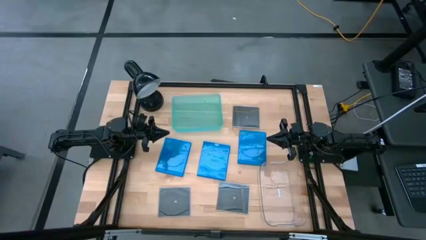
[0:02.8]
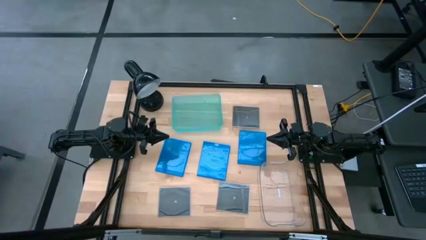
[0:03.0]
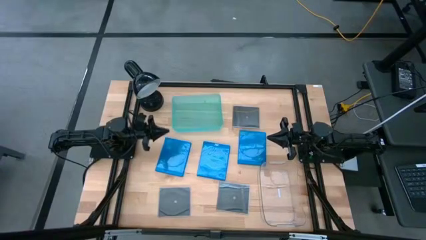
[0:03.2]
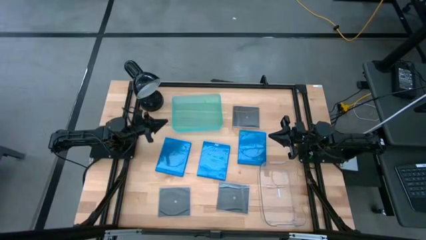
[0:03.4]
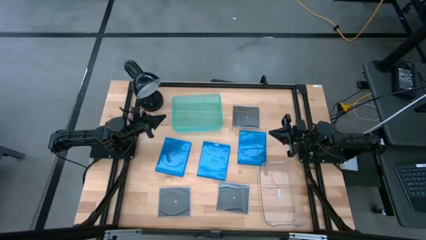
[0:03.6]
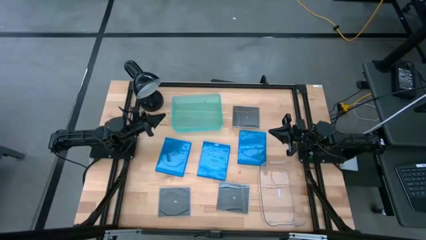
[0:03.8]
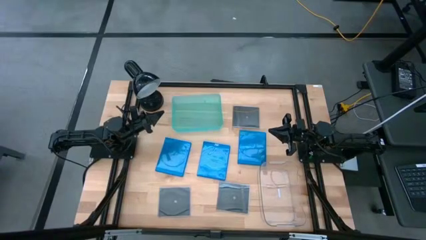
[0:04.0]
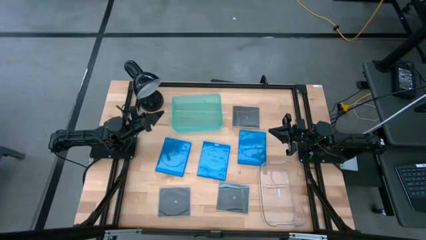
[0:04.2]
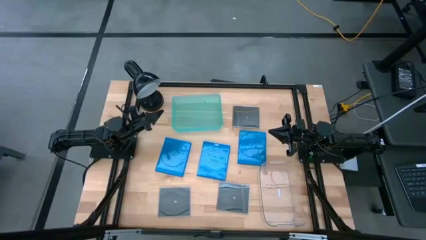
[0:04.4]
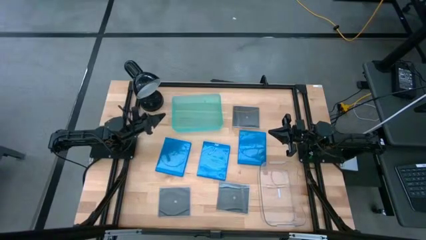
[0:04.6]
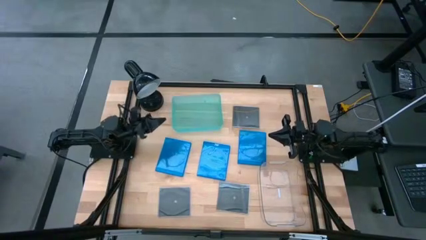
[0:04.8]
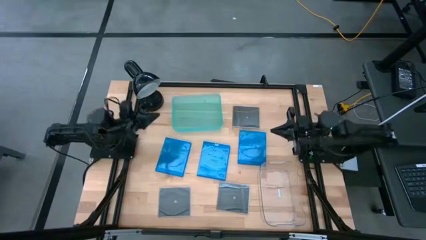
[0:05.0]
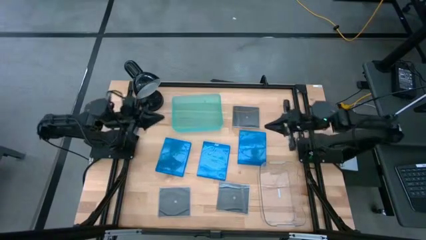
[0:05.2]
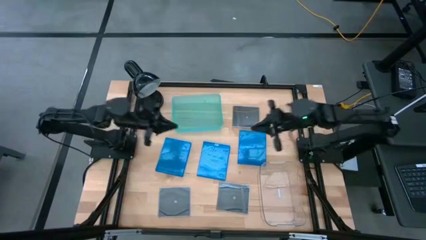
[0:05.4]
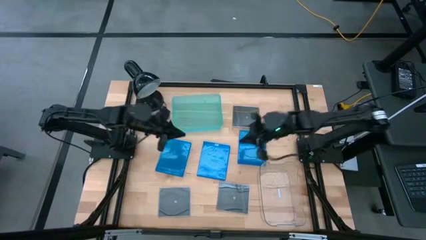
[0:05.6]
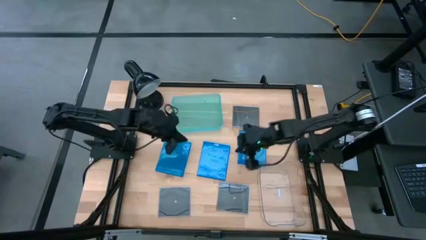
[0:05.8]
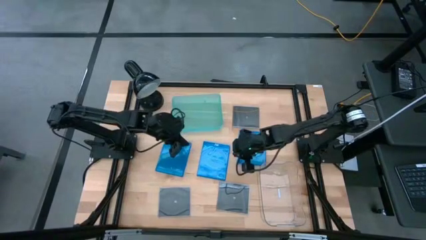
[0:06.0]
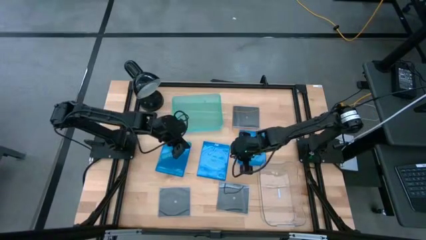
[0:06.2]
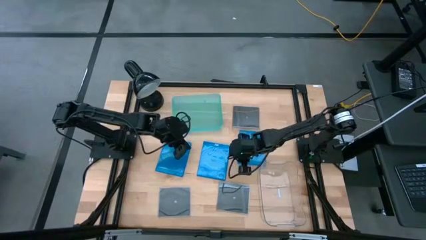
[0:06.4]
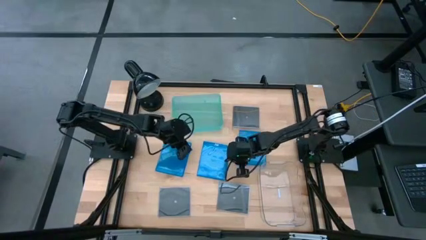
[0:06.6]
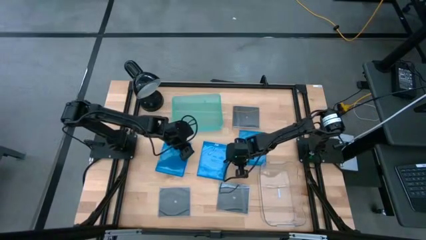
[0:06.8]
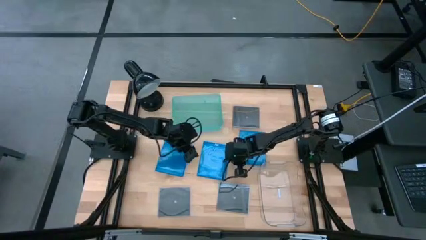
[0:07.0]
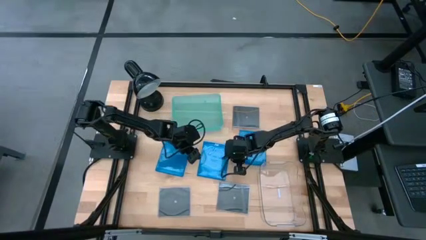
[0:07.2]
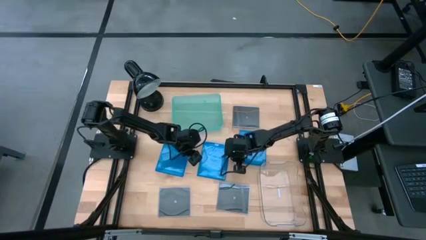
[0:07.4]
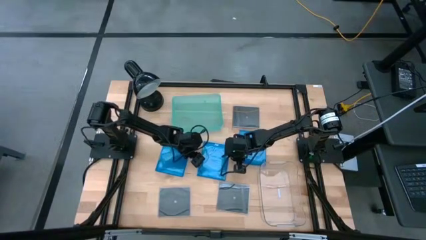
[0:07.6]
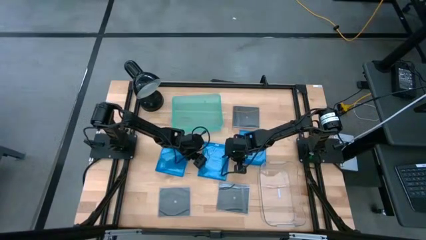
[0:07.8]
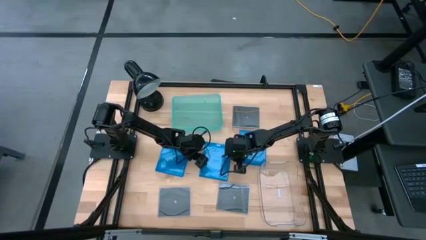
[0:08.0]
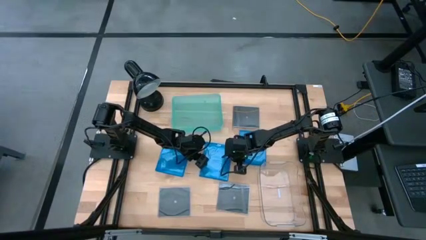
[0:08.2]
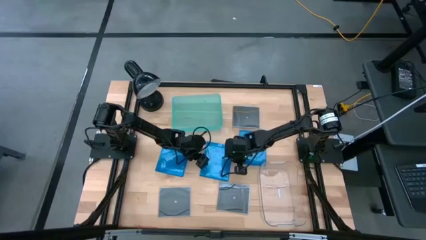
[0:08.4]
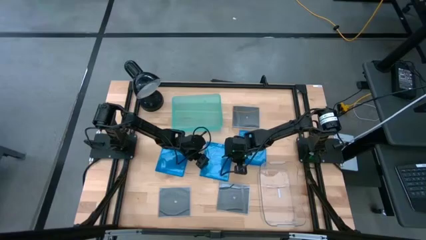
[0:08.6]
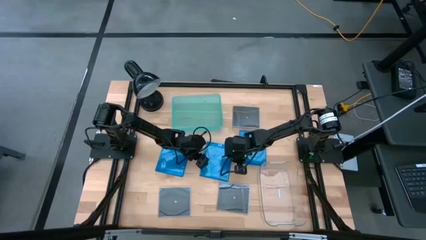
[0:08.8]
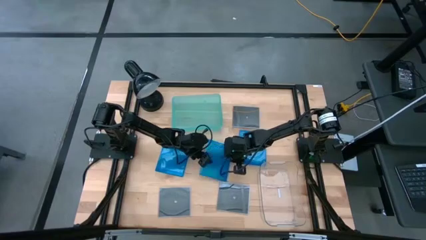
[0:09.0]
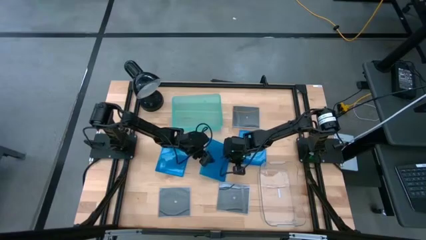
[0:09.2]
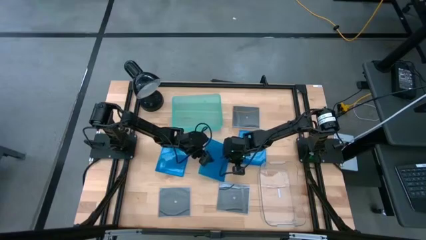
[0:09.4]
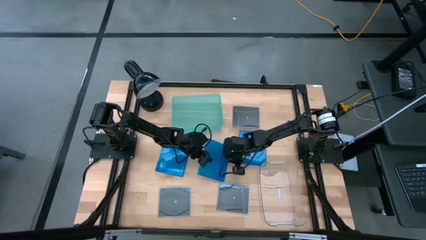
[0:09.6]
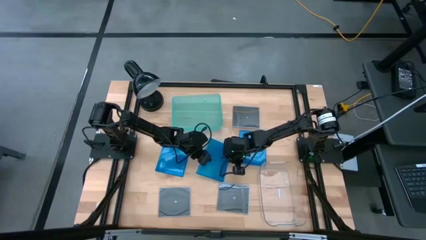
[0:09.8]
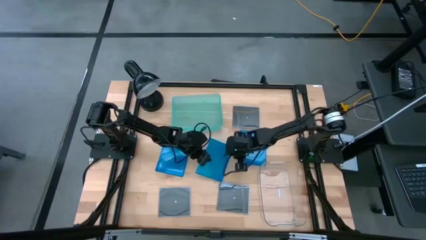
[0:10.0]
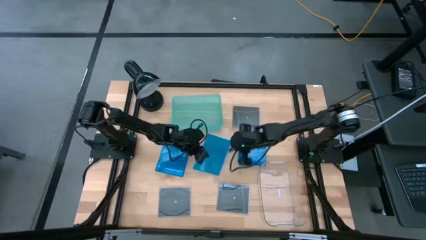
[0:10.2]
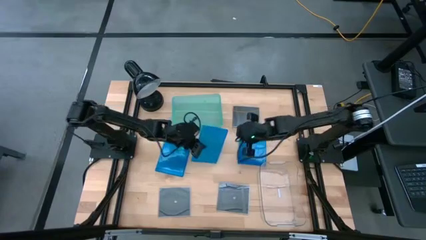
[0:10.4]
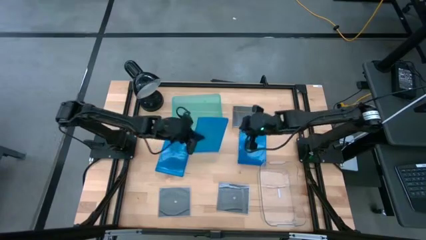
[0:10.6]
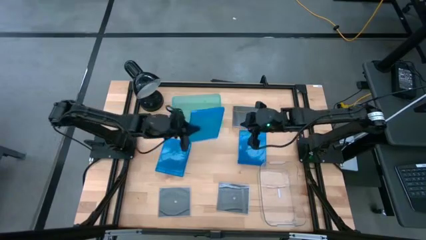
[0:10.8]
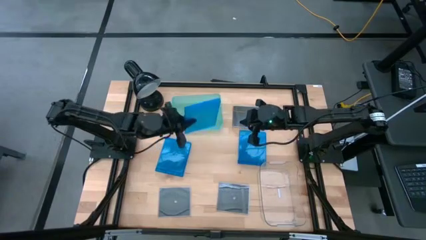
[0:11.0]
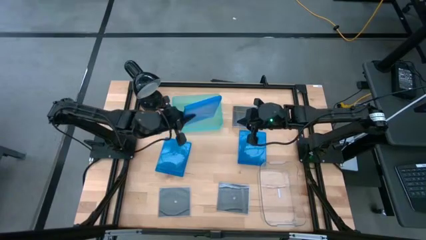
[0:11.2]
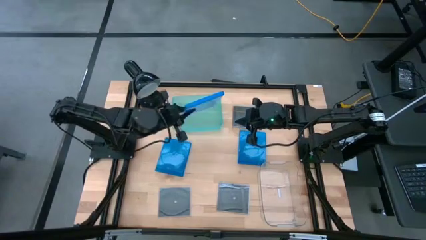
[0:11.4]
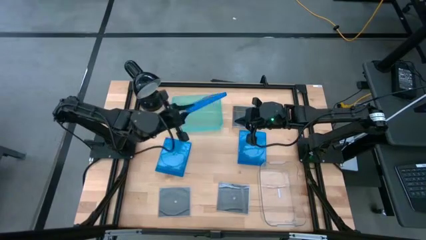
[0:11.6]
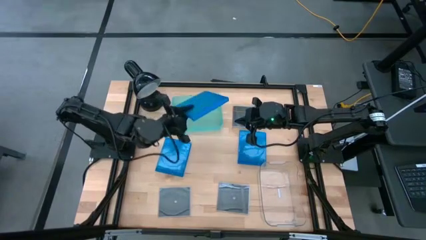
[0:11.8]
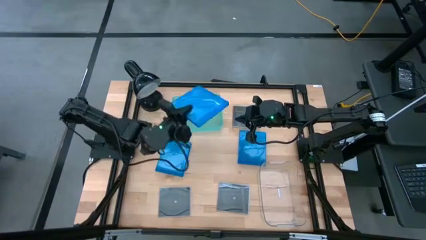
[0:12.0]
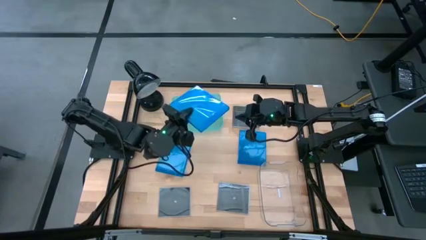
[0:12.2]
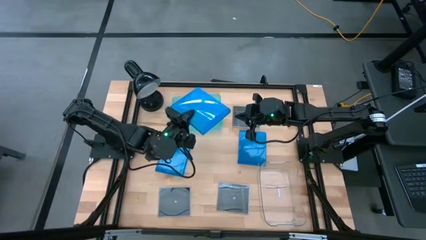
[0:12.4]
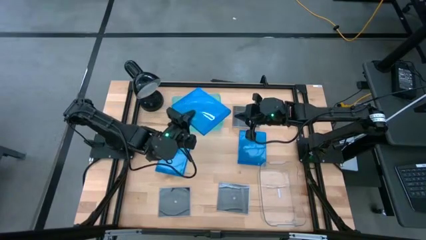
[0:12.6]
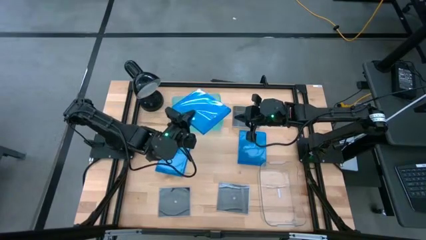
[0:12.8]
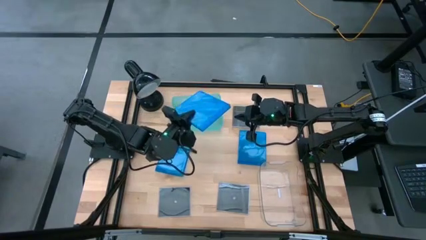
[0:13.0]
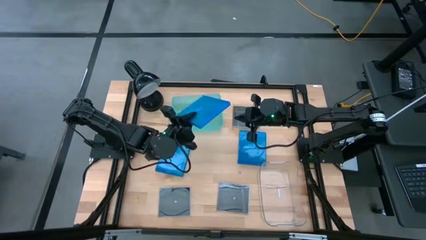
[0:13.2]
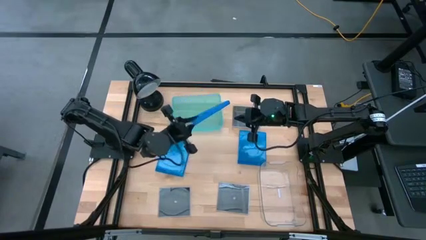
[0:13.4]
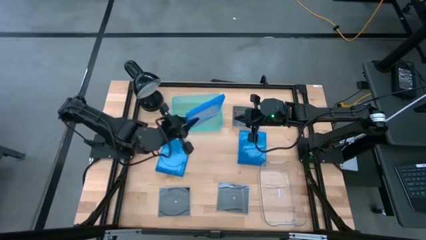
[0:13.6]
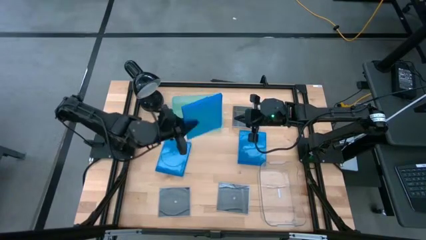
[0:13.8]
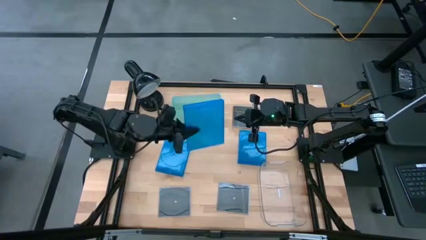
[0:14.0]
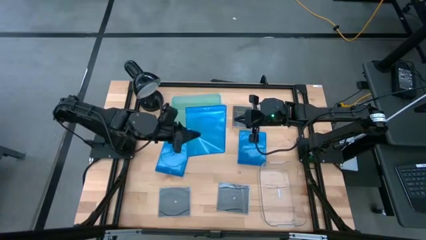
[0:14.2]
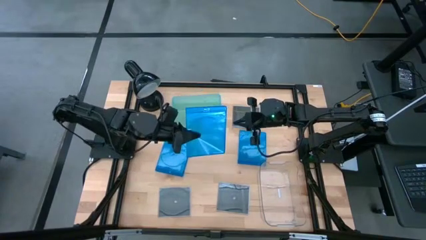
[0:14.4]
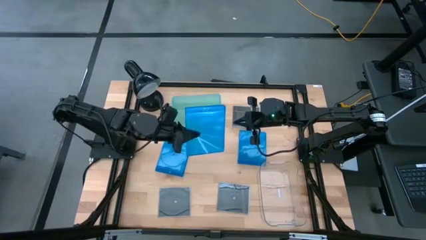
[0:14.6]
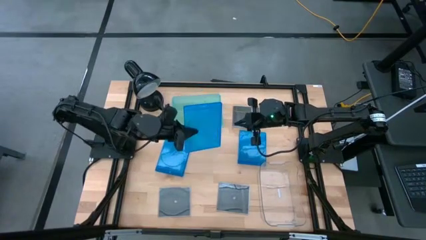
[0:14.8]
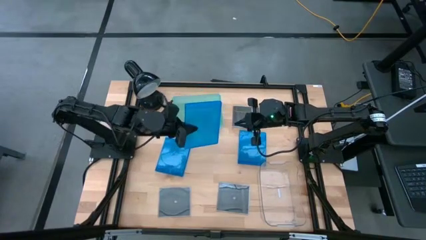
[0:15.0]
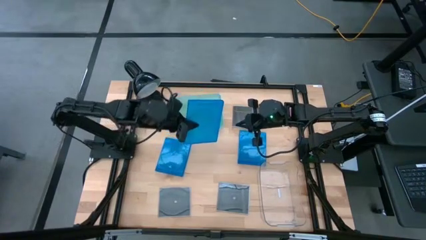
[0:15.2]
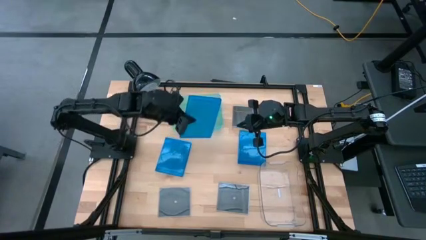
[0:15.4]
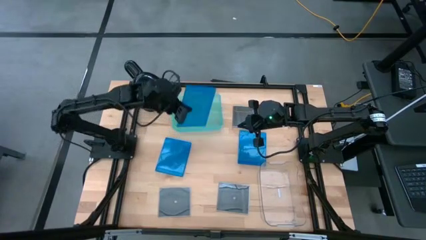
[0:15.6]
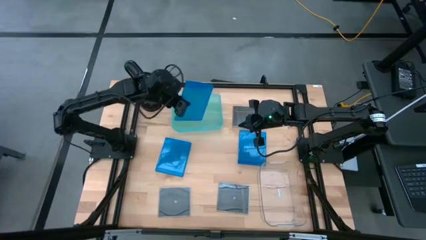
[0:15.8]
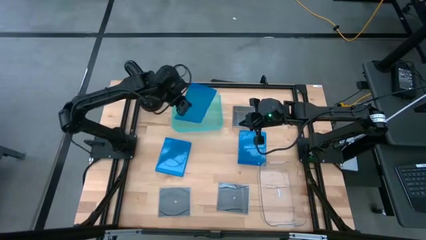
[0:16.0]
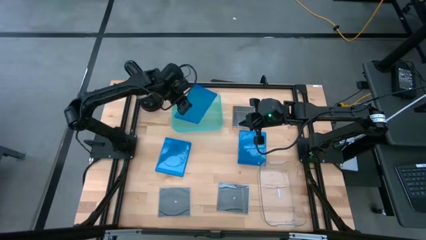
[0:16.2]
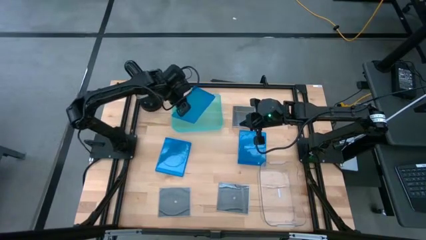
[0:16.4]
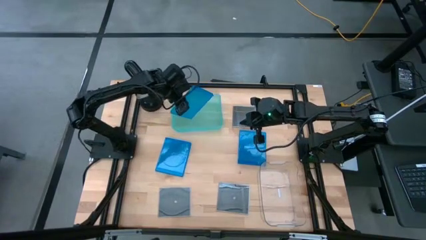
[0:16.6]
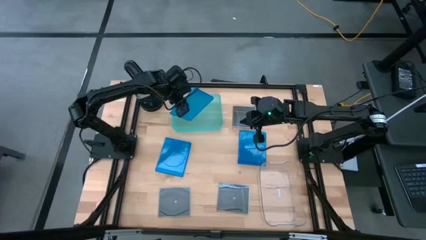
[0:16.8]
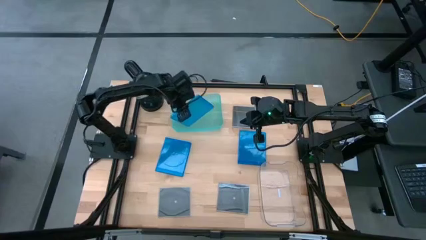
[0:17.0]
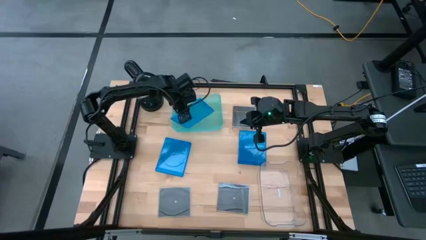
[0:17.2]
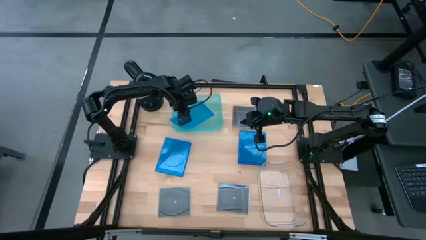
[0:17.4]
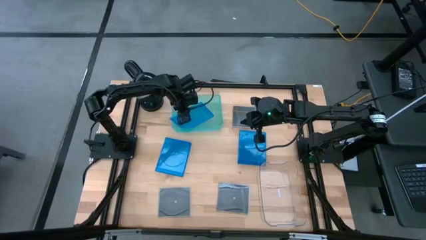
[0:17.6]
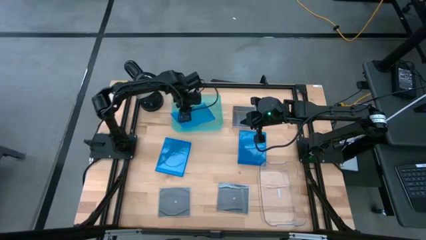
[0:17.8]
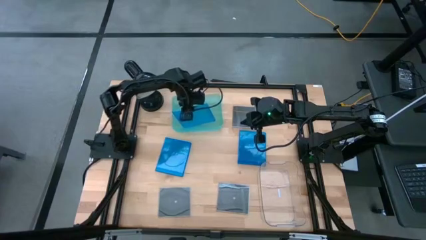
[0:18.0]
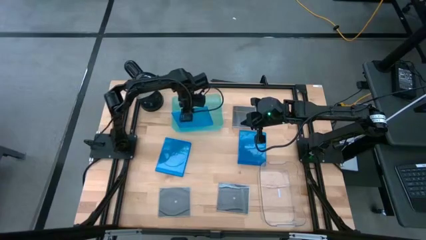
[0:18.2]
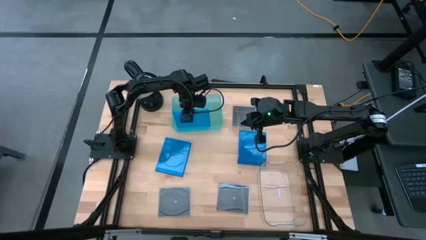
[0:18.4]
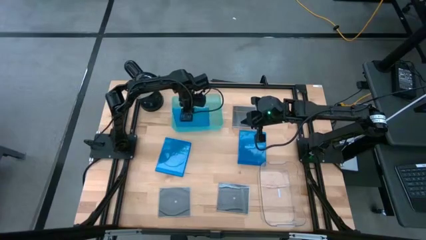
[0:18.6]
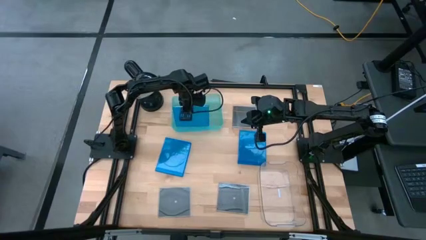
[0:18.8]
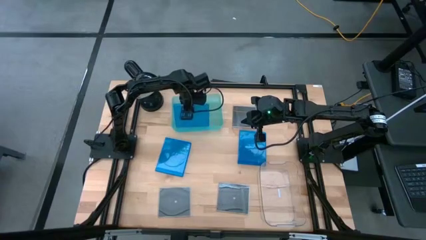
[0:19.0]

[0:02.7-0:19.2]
Task: Pick & place jewel cases by type
Put the middle blue CD case into the green bin
